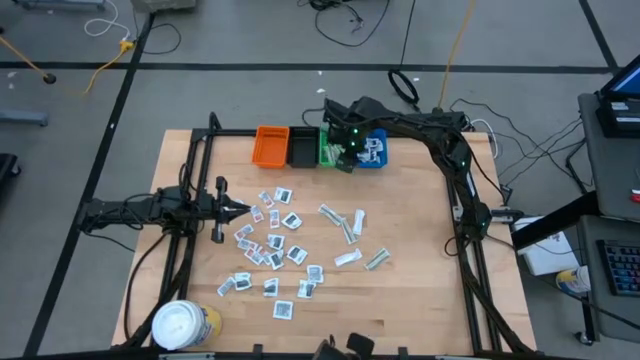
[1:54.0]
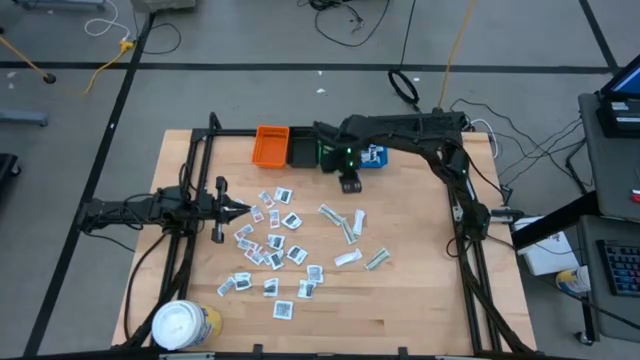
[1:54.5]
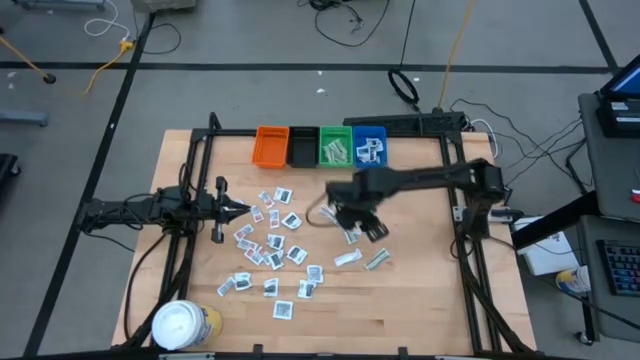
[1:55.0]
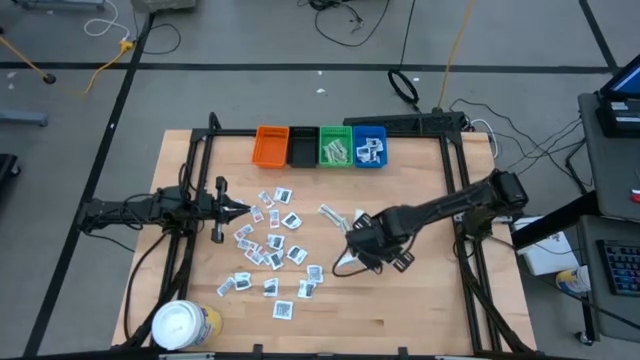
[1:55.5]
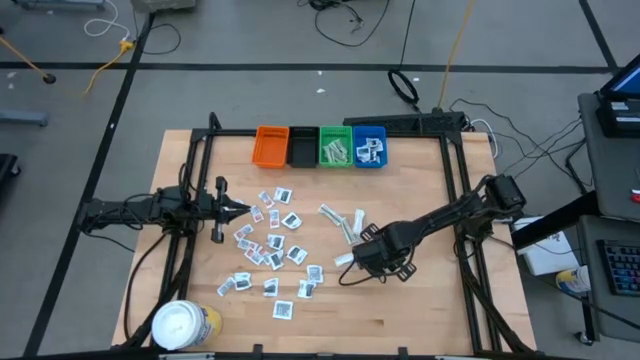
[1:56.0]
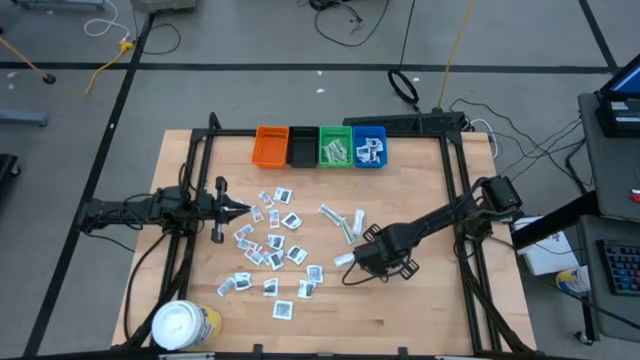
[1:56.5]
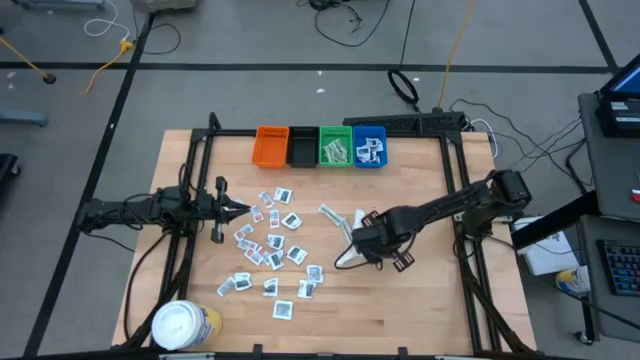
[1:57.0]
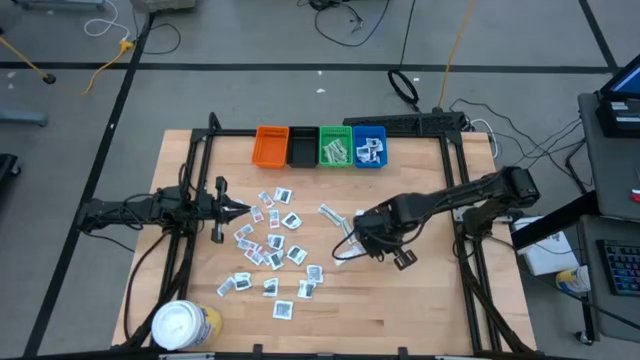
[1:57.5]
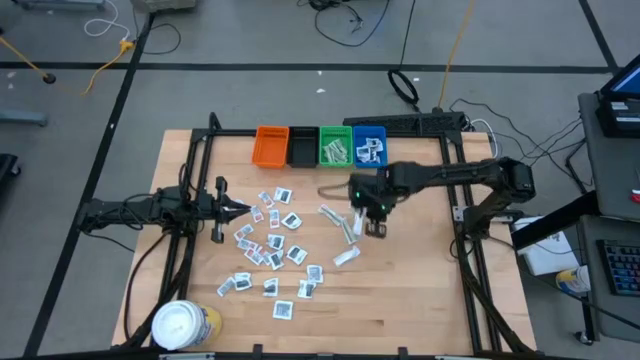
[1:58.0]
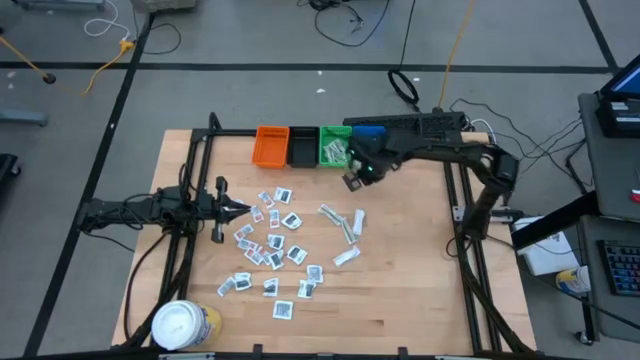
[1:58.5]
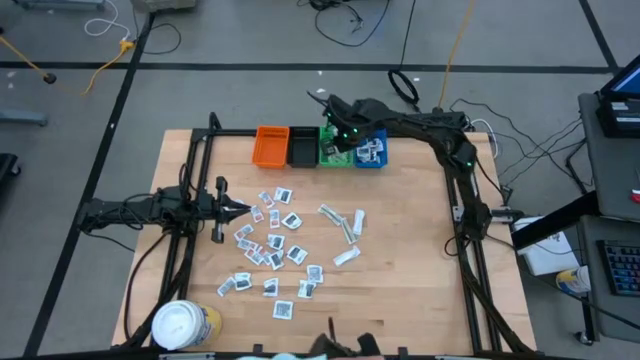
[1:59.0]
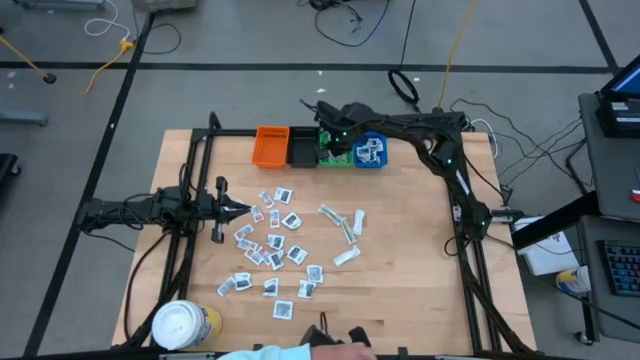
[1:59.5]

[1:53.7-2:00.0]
Task: Pick & Place First Aid Supplies
Put the green bandage into the green bin

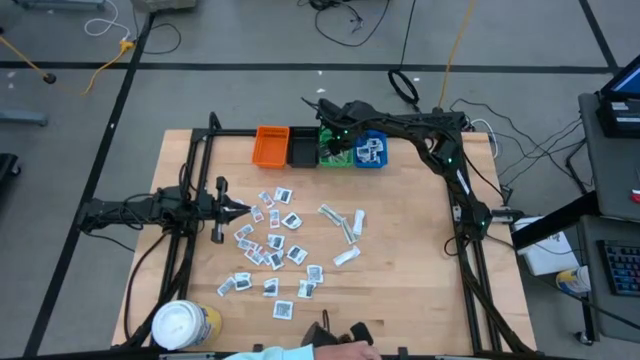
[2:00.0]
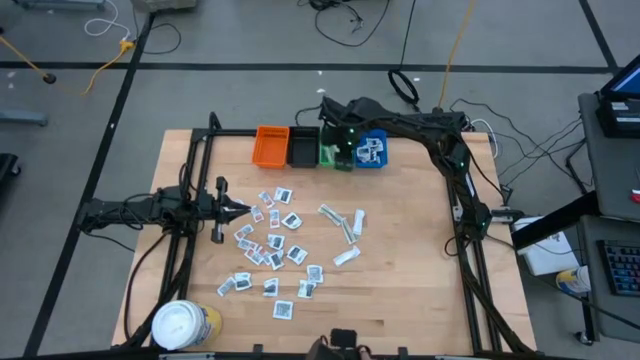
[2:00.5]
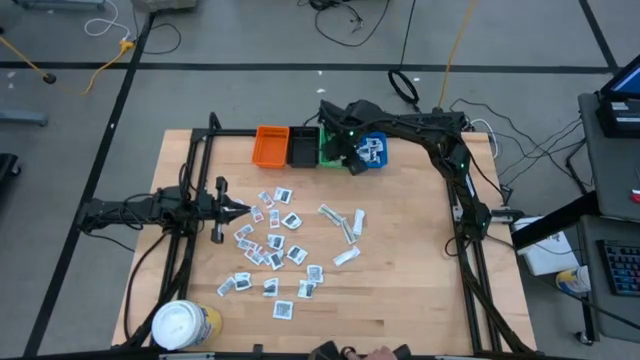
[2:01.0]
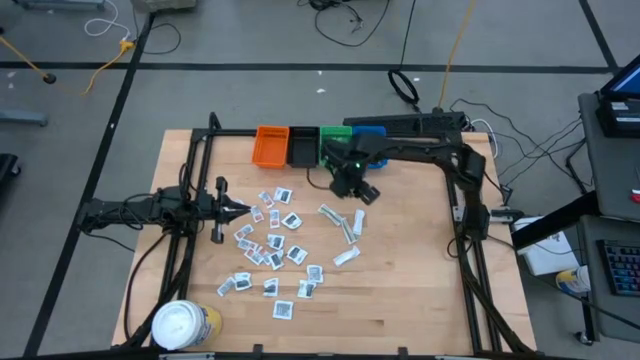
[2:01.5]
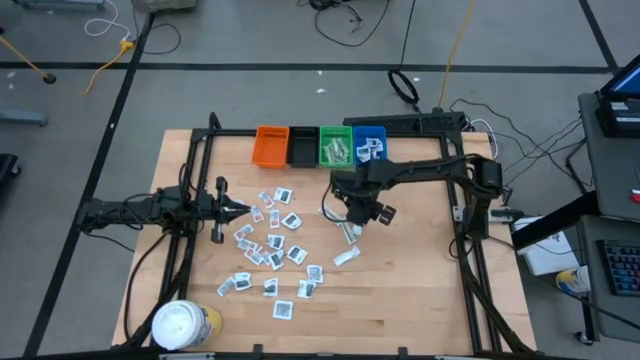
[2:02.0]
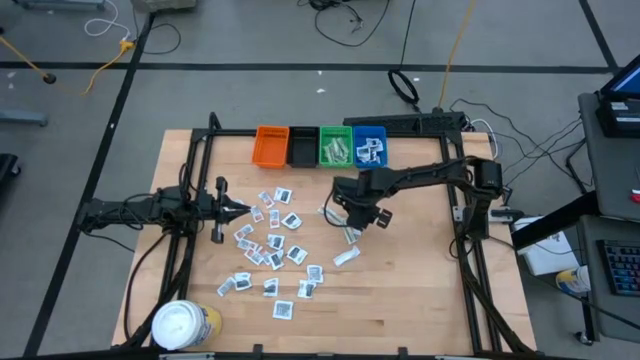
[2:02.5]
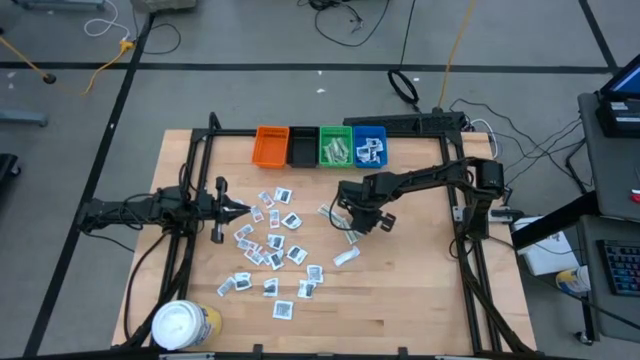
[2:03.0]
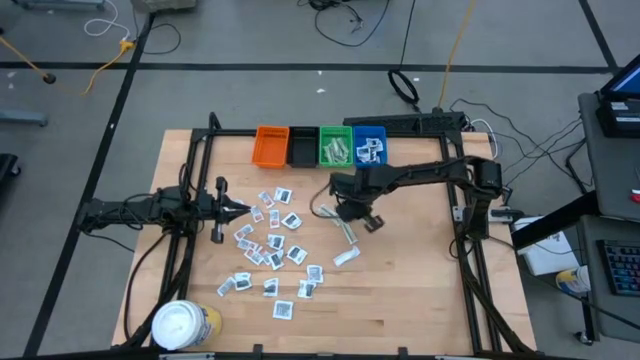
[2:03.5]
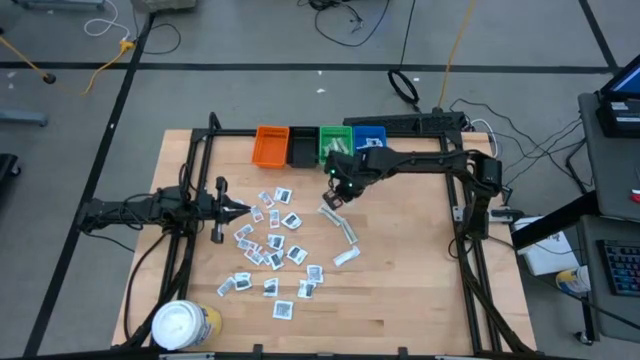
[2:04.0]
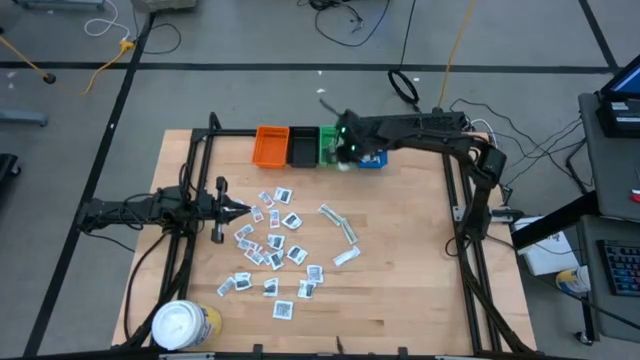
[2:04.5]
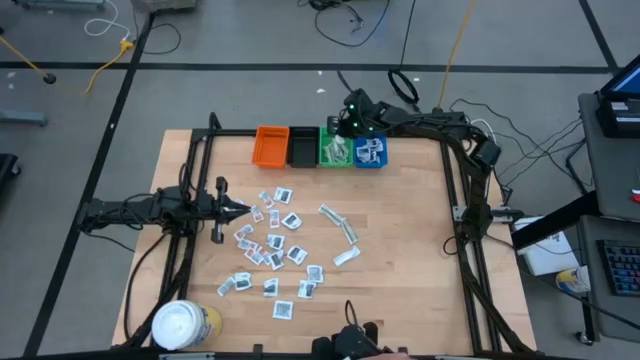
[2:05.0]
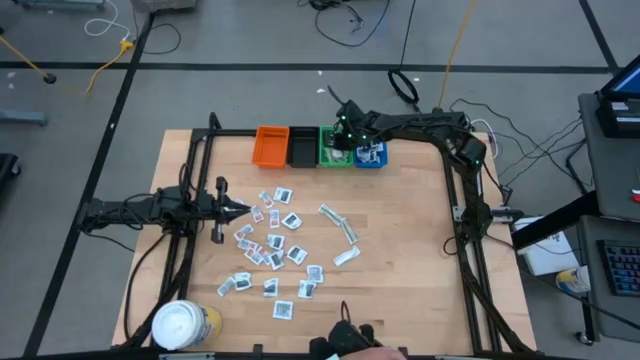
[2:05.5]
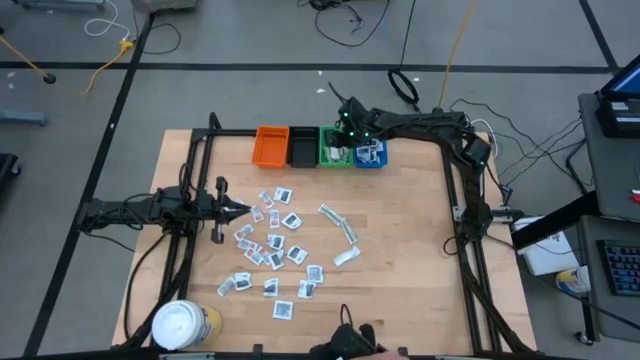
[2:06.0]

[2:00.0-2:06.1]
Put the green bandage into the green bin

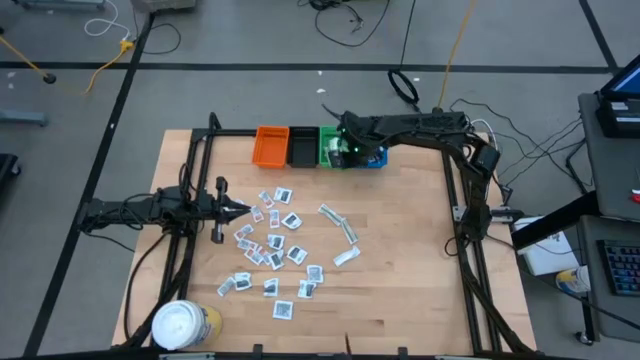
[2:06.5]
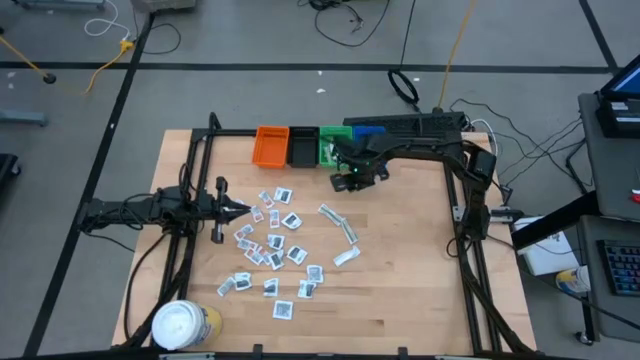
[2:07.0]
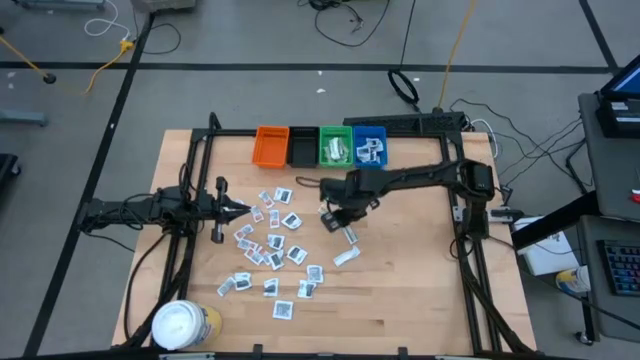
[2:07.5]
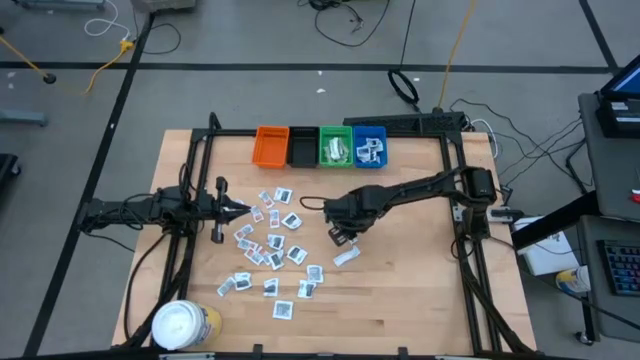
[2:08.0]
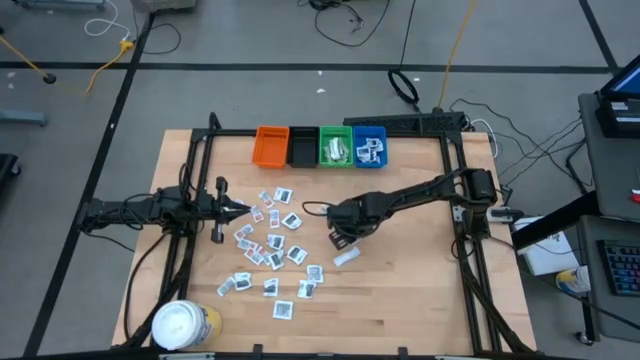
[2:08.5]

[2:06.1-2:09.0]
Put the green bandage into the green bin

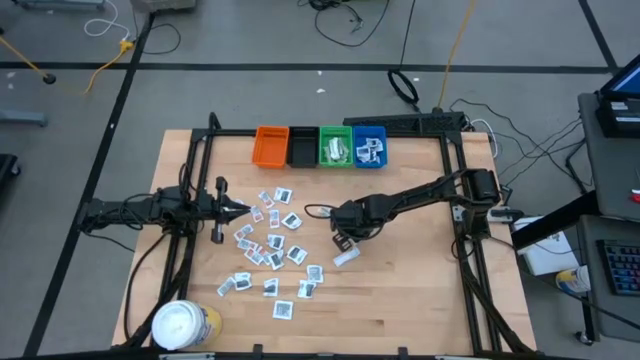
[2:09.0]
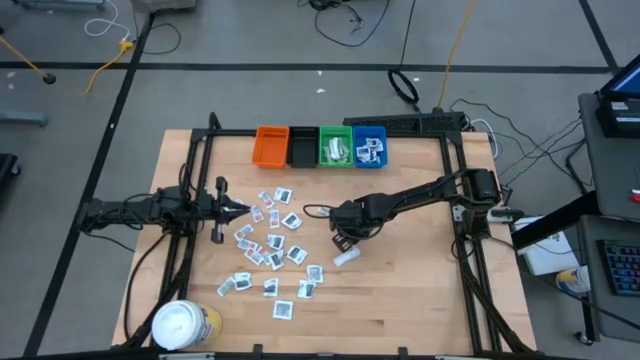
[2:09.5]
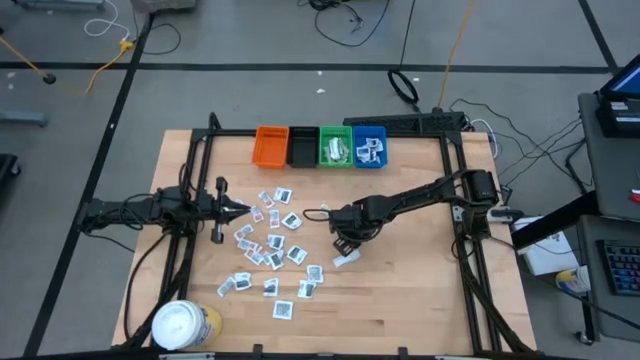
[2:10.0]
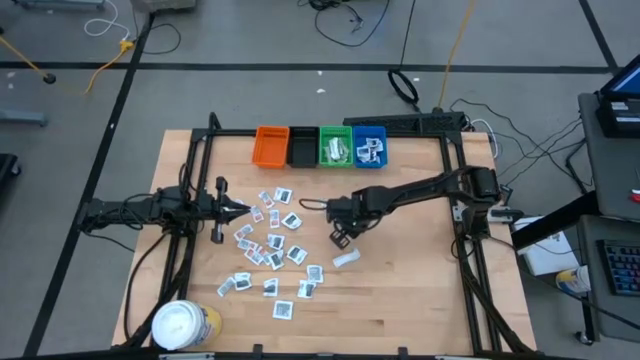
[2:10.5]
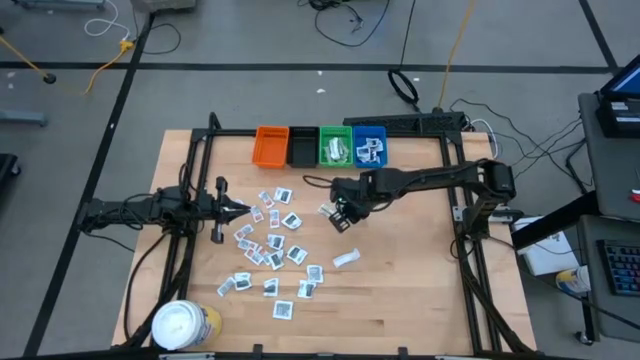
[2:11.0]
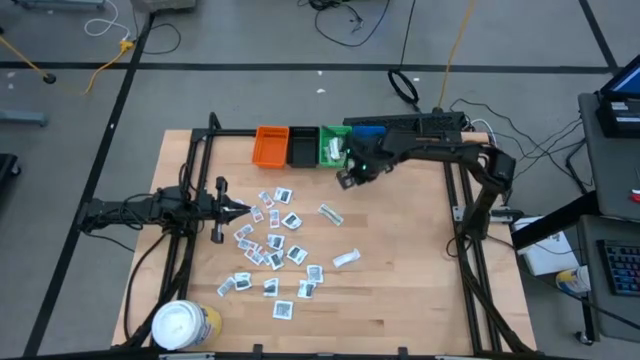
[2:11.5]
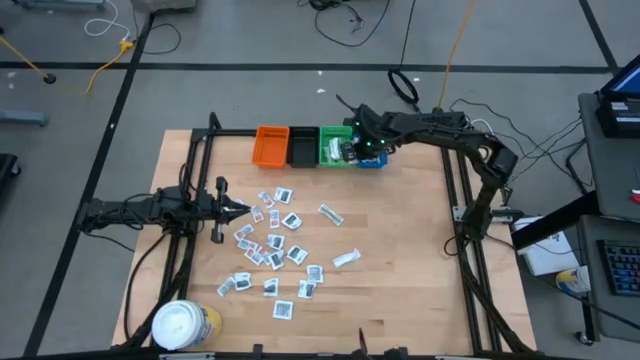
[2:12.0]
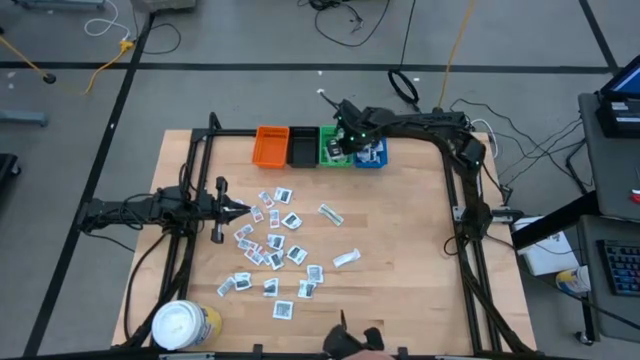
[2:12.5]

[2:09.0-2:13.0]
Put the green bandage into the green bin

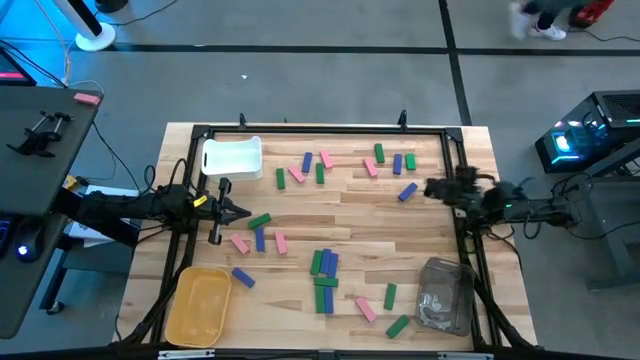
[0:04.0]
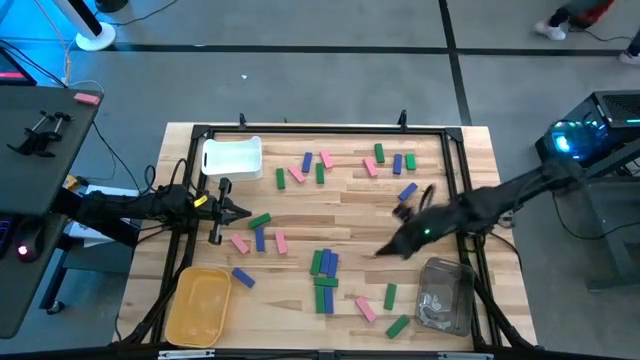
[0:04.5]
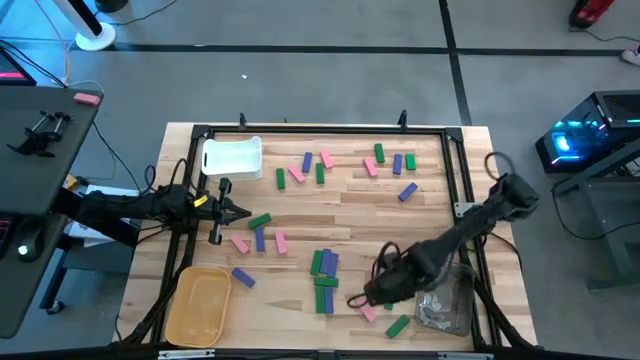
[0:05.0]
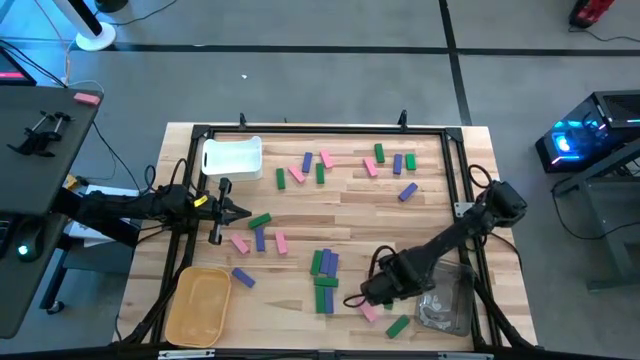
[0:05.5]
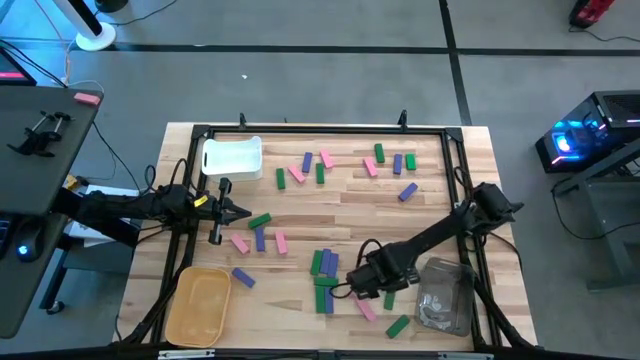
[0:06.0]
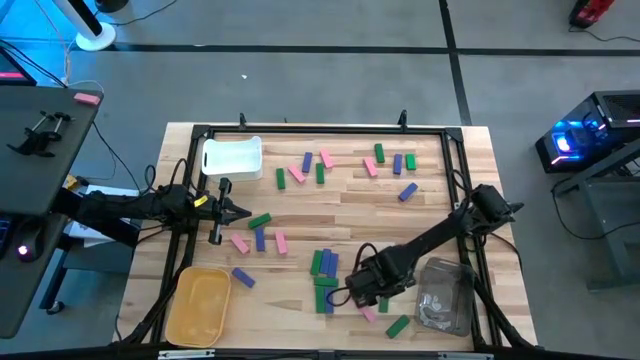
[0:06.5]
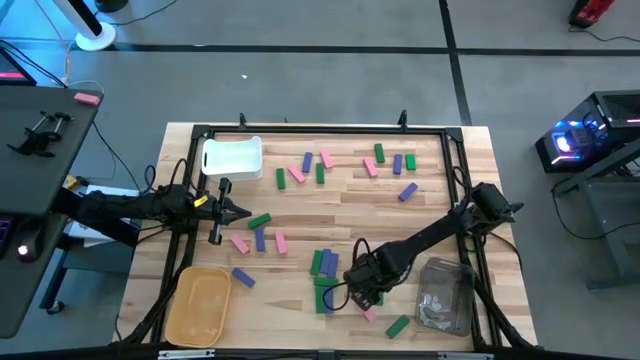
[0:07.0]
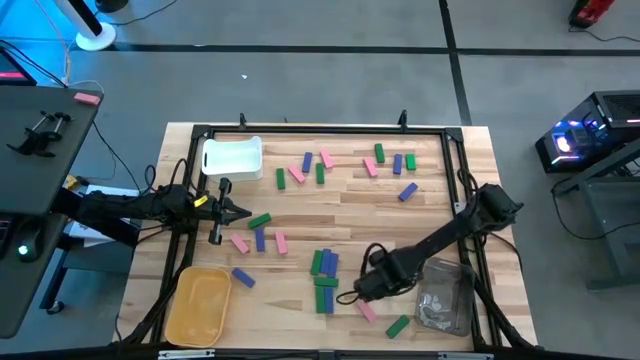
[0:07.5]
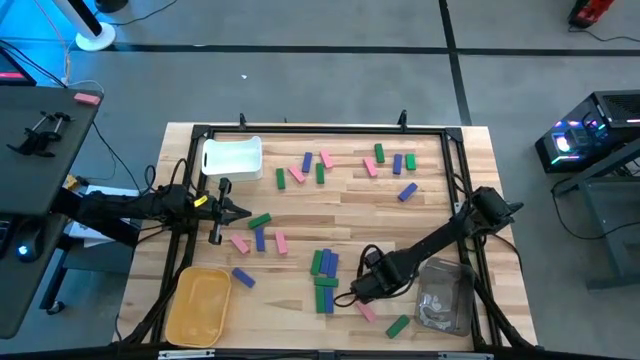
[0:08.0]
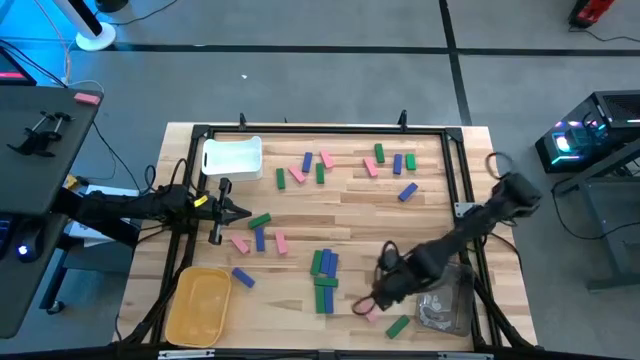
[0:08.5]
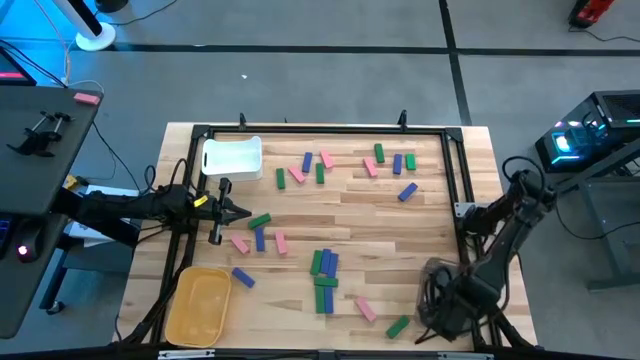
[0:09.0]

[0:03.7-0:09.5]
Task: Sort blocks
Put the green block into the black transparent bin
